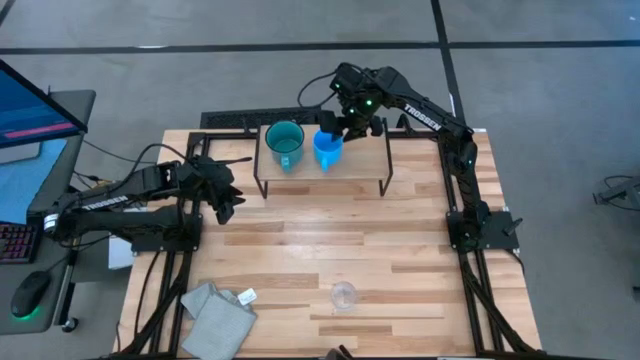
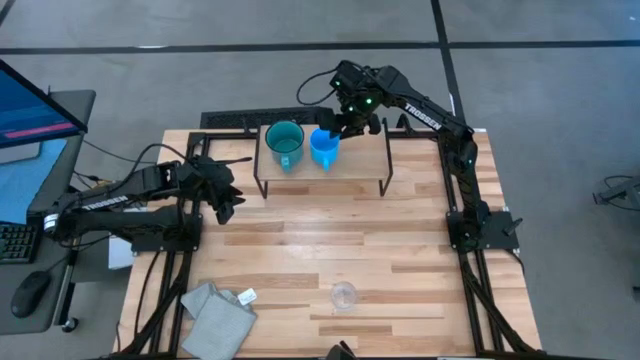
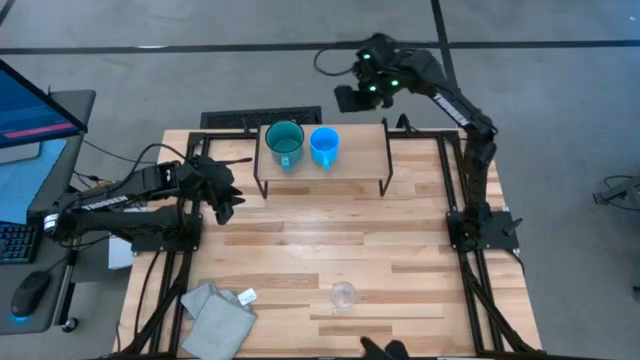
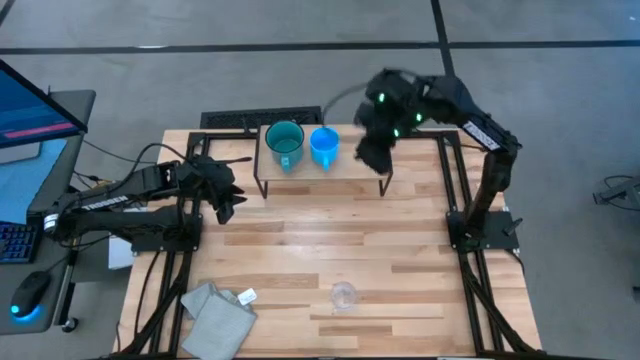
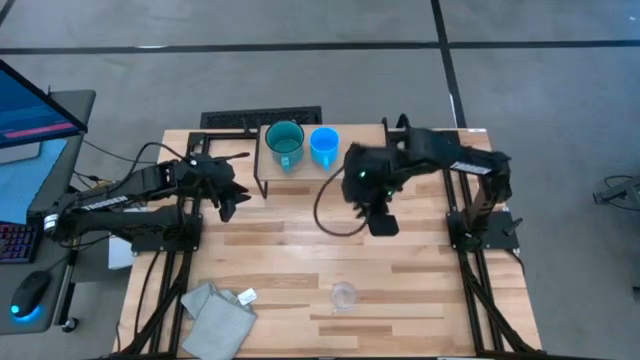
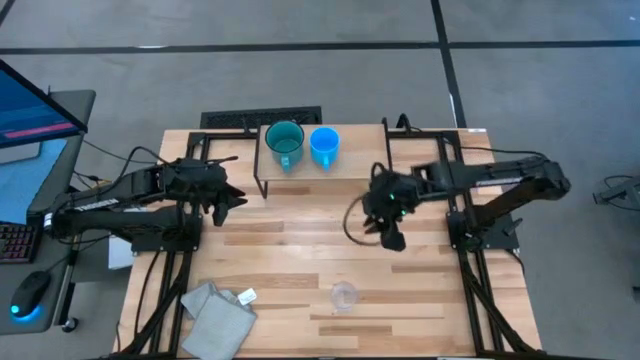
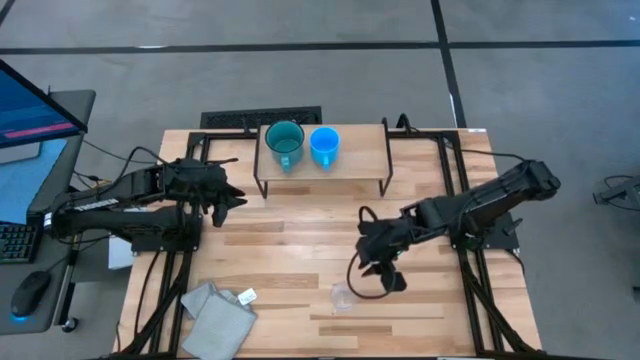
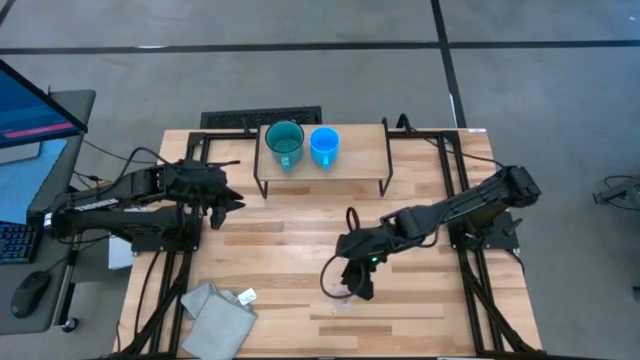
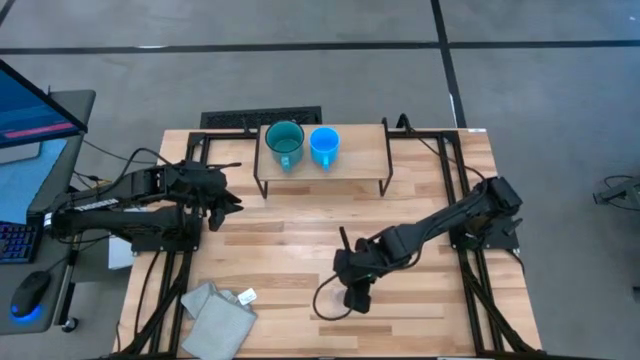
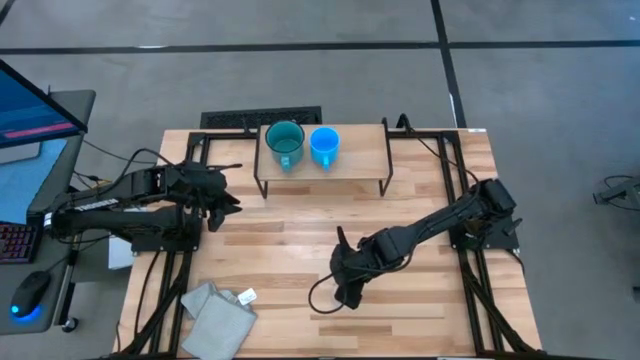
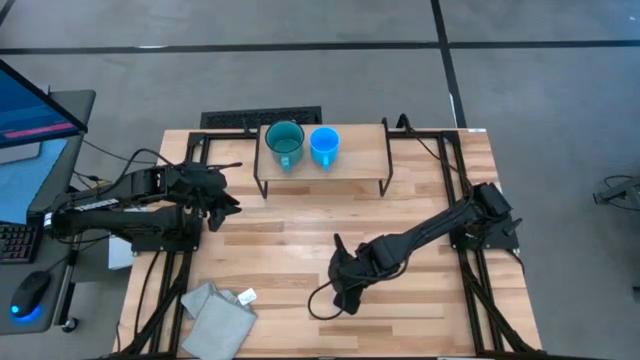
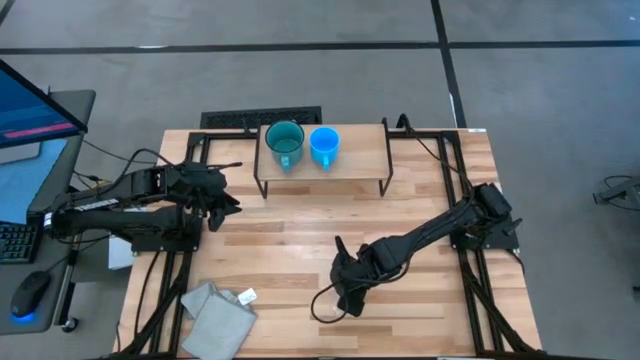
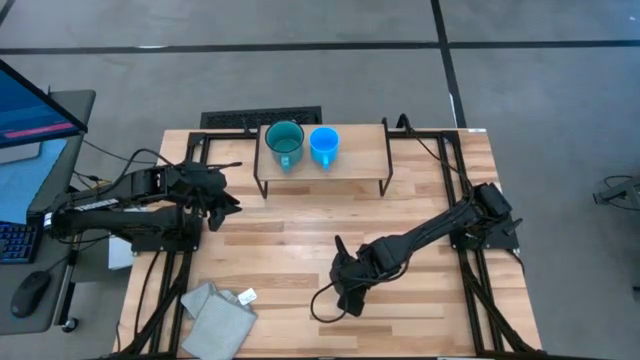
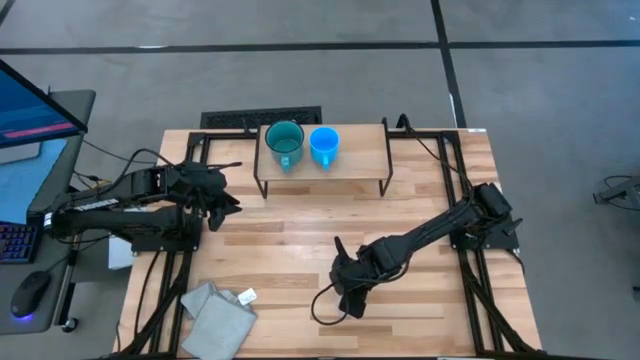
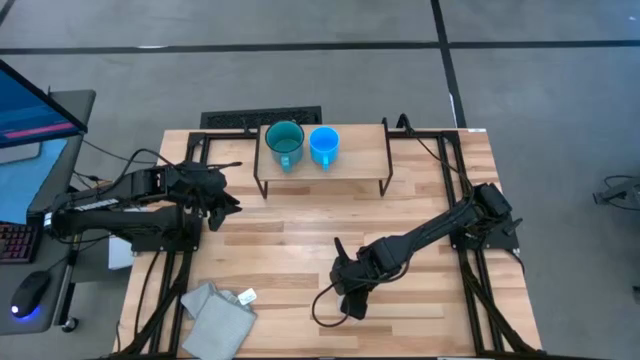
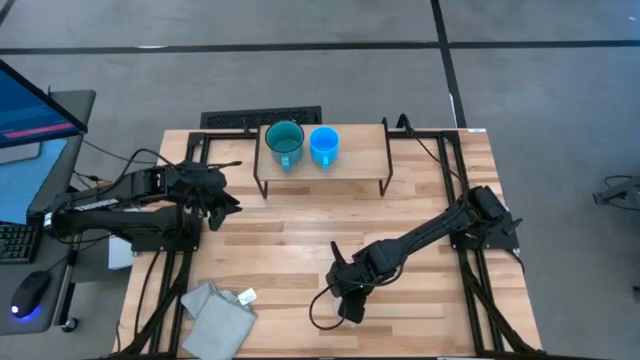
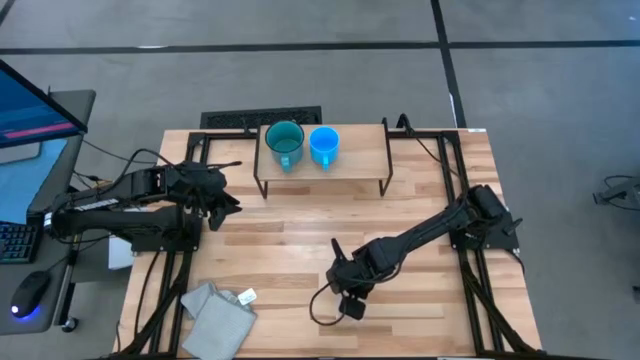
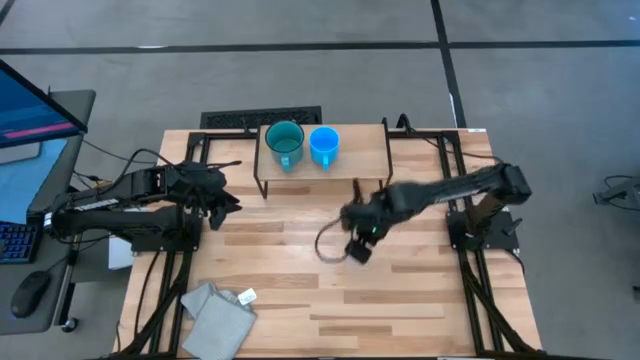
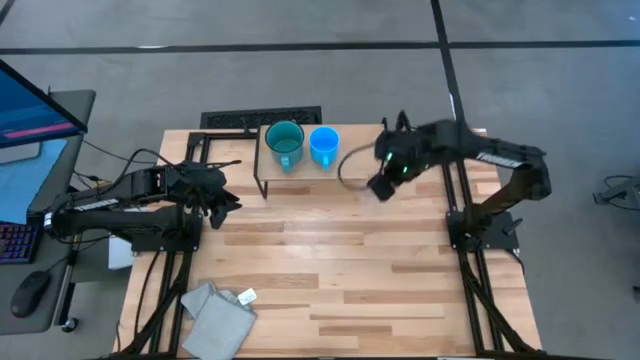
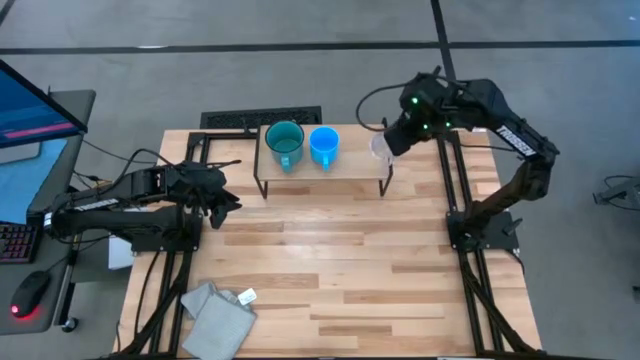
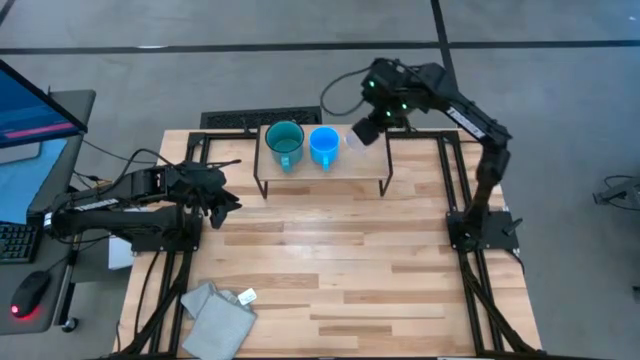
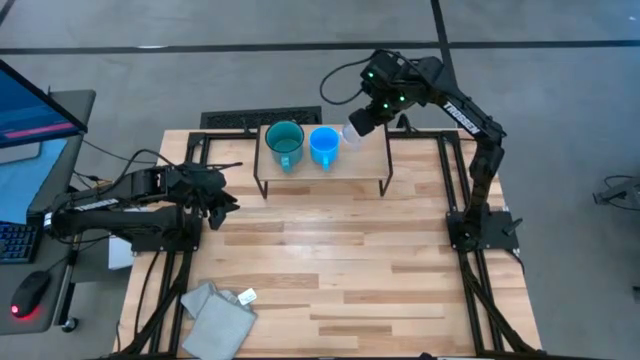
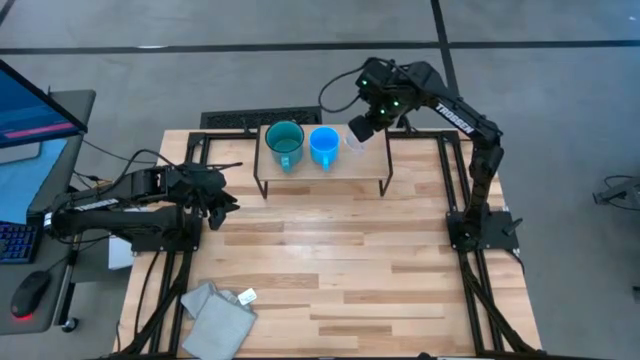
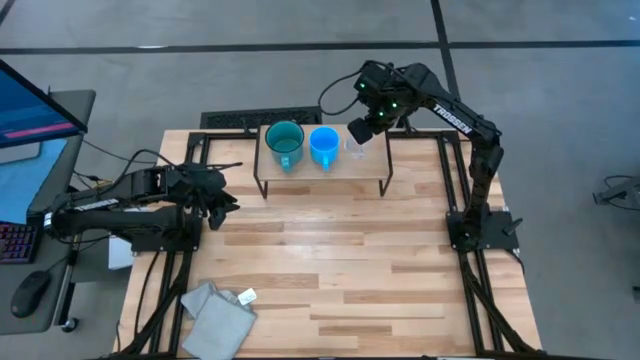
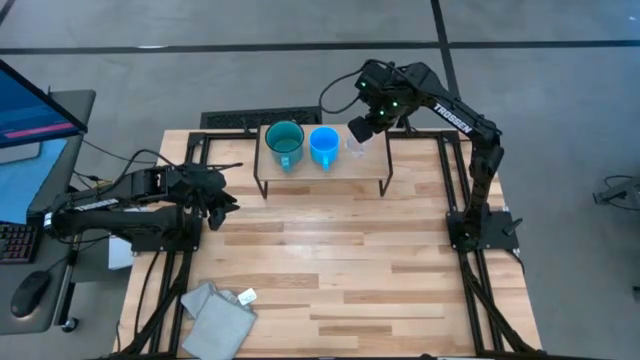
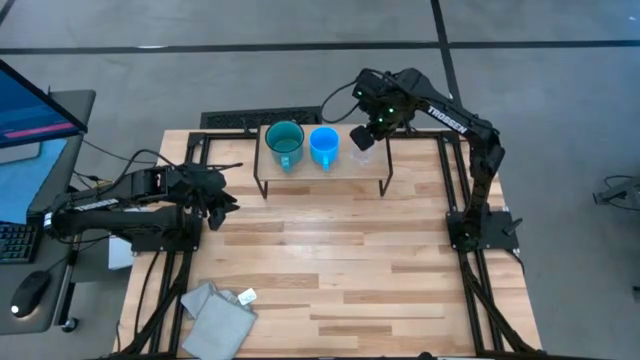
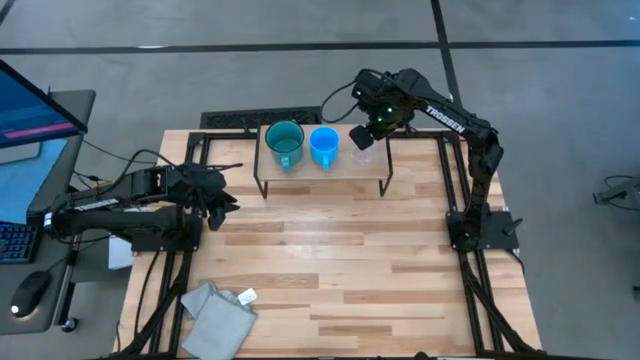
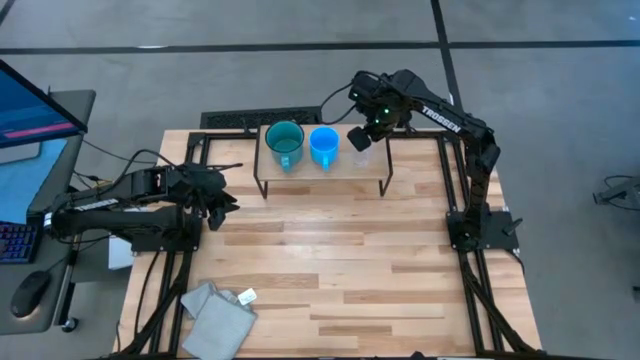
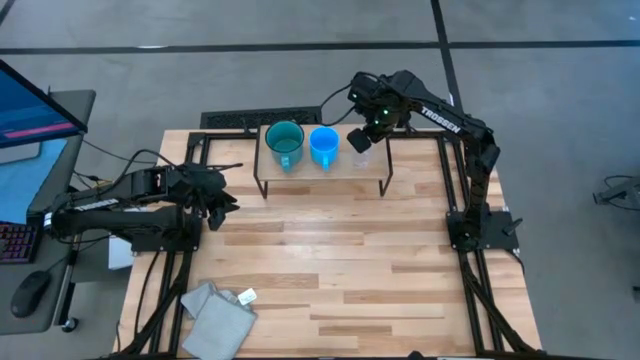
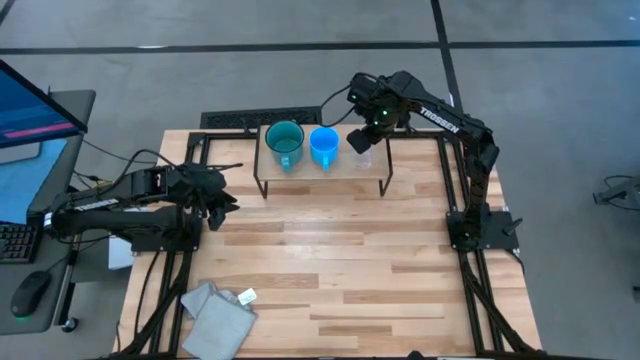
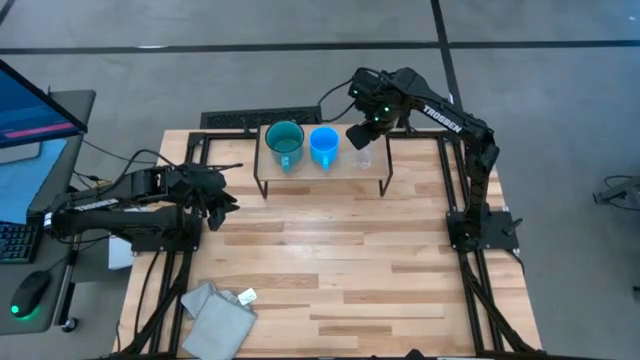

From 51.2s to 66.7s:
Task: Stack small to large cups/mugs on shelf
Put the transparent mug on the shelf

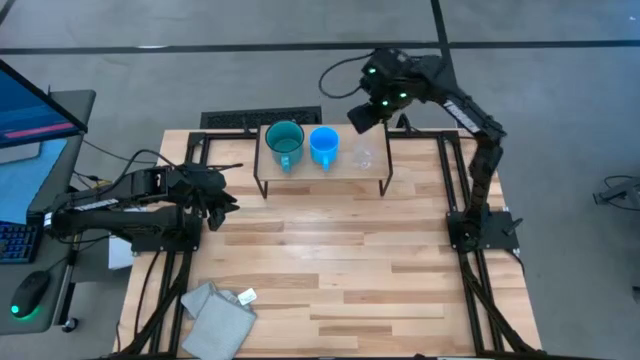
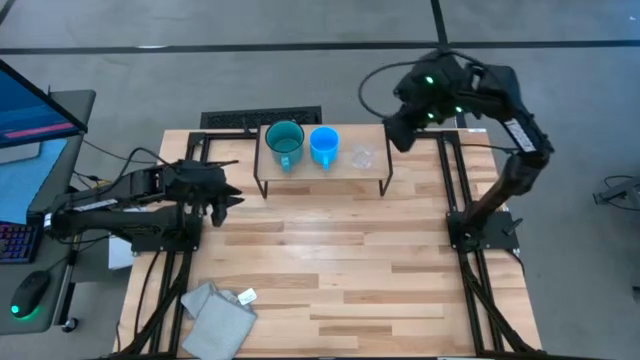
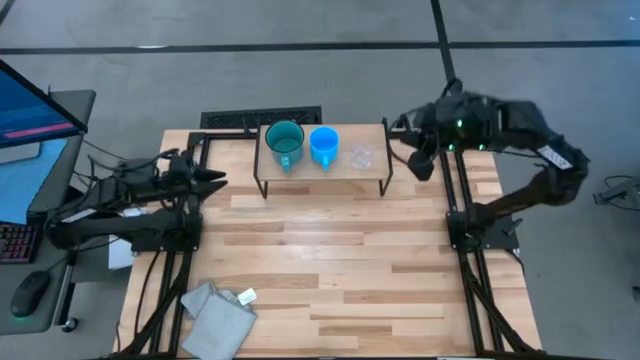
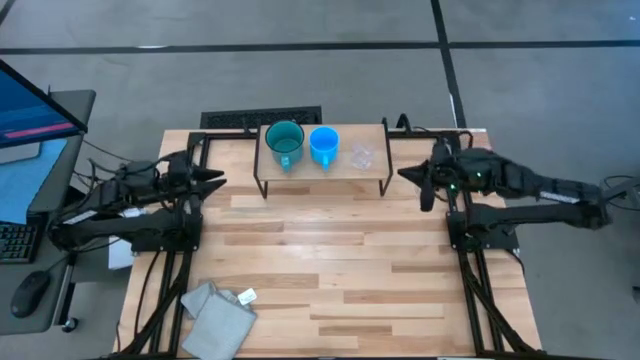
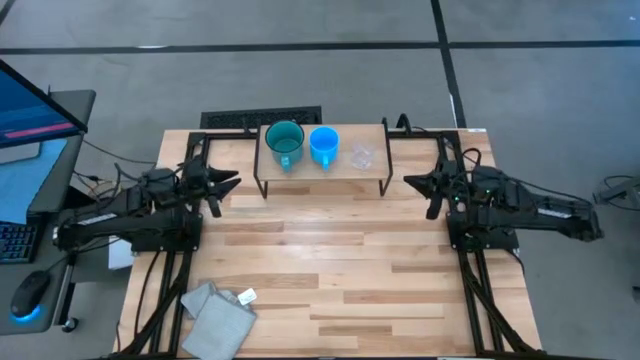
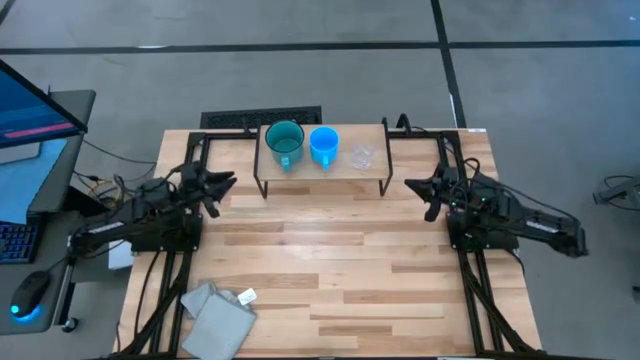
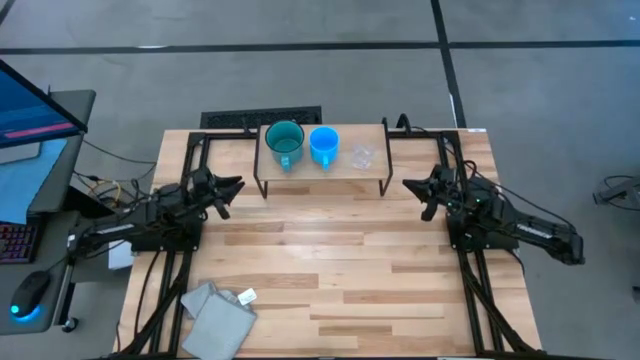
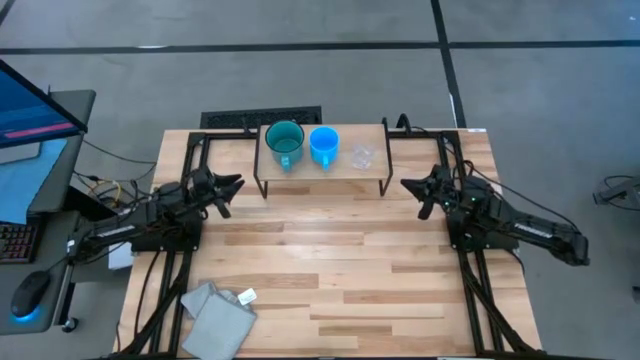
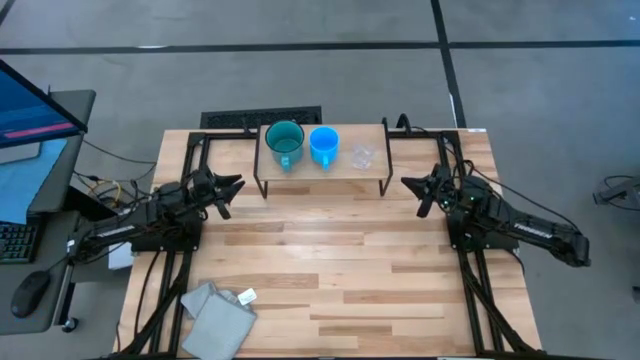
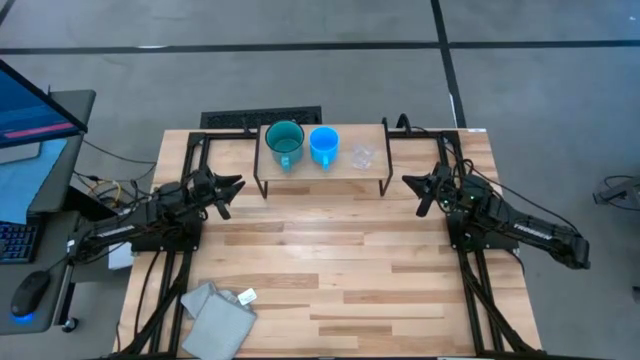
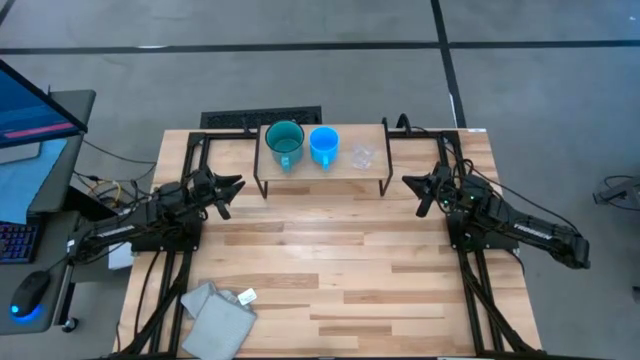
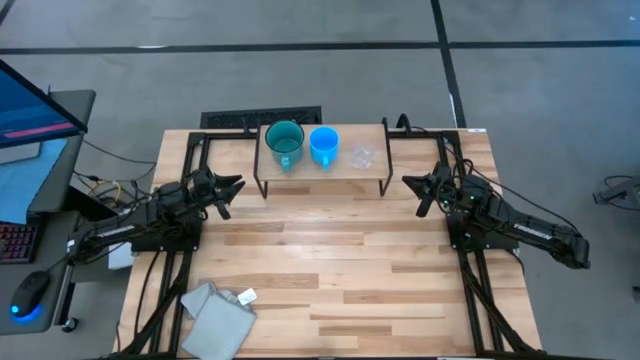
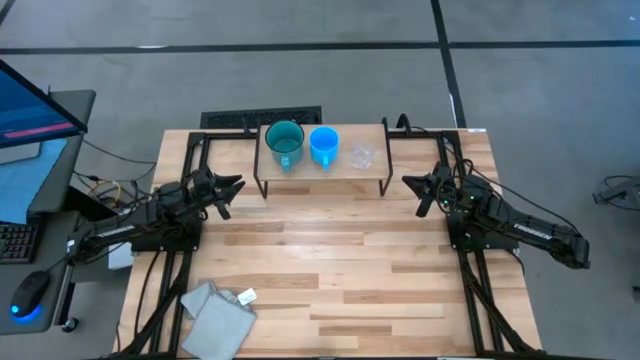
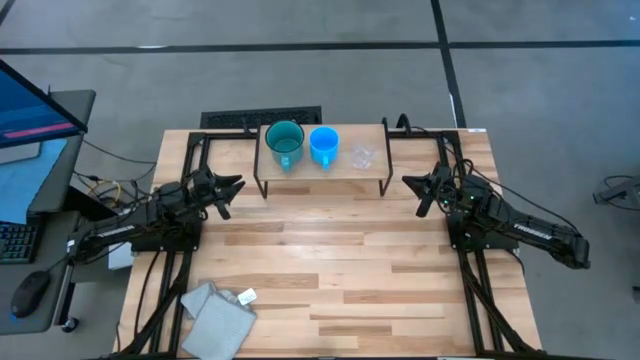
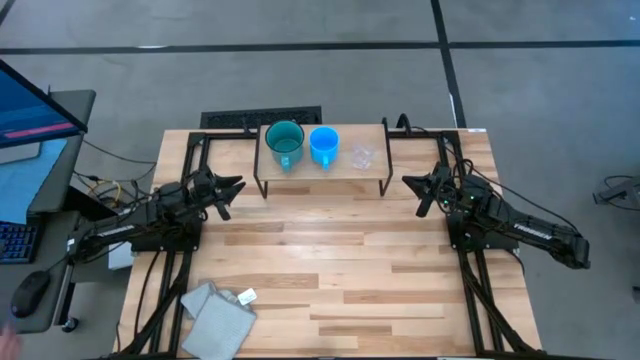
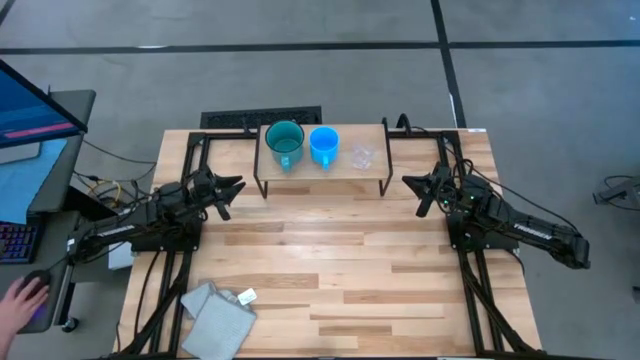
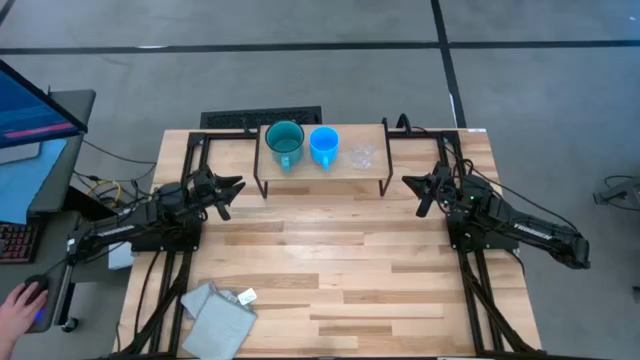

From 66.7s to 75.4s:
Return to Home Position
